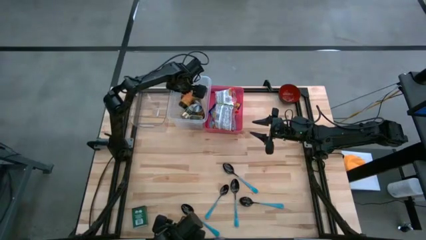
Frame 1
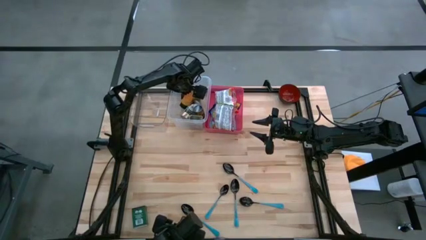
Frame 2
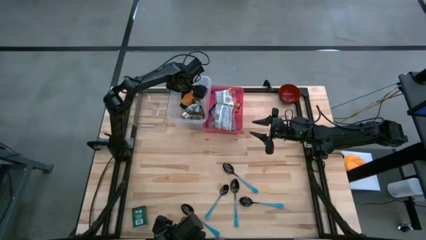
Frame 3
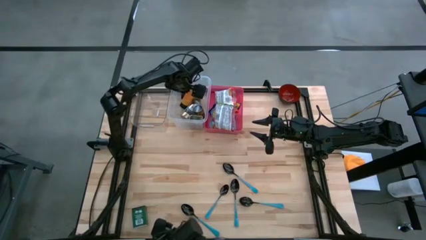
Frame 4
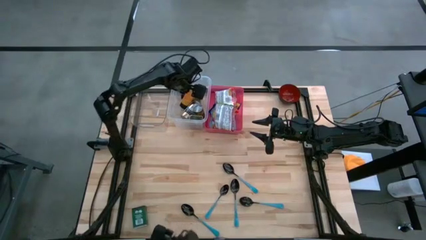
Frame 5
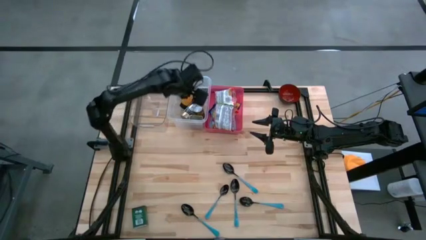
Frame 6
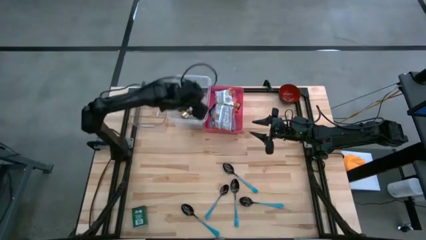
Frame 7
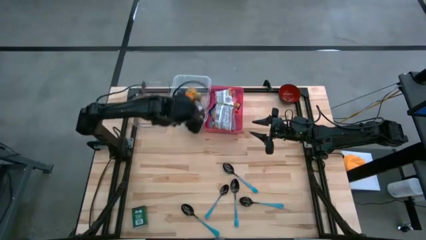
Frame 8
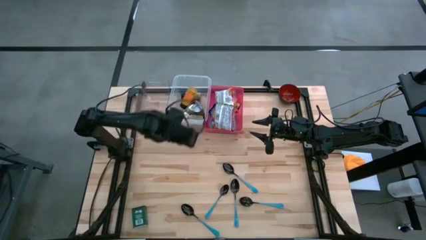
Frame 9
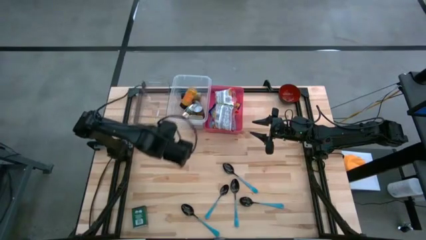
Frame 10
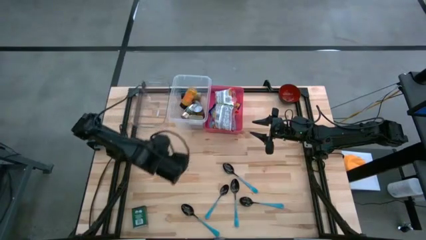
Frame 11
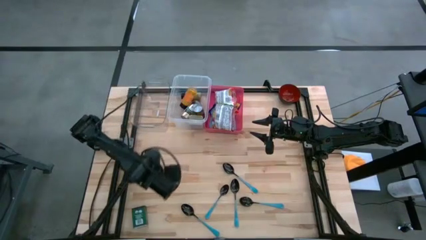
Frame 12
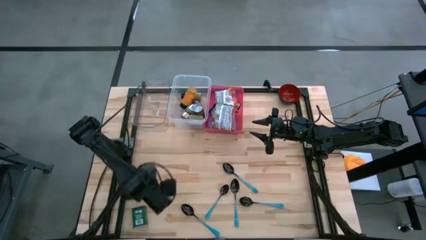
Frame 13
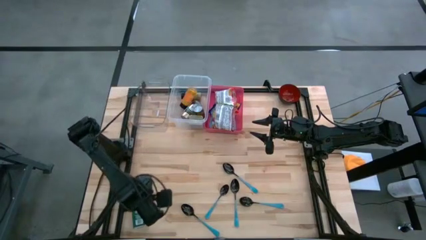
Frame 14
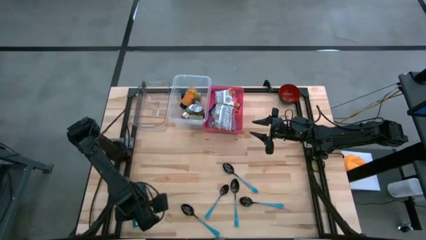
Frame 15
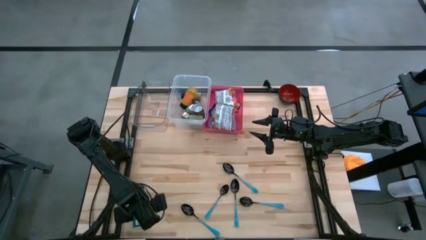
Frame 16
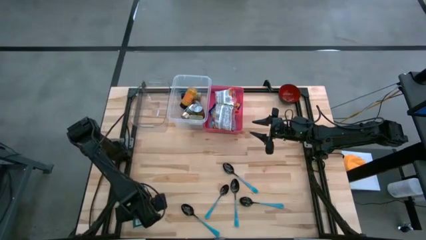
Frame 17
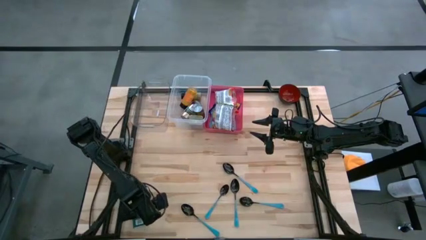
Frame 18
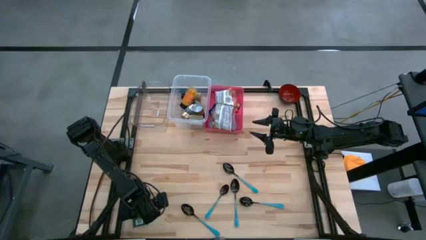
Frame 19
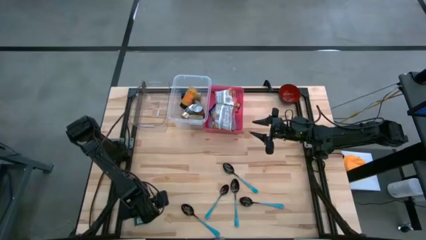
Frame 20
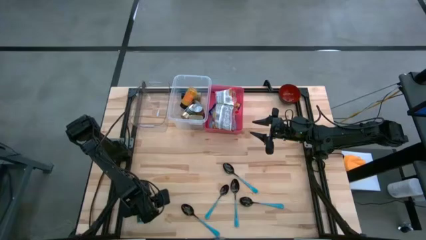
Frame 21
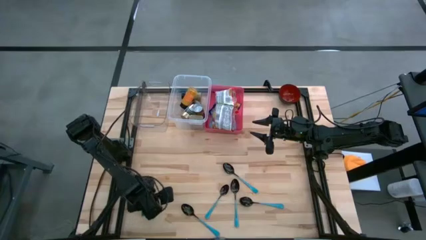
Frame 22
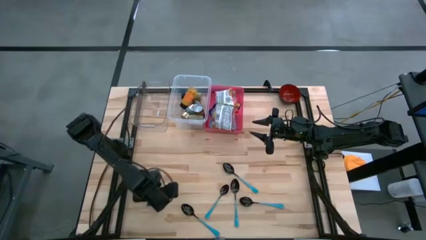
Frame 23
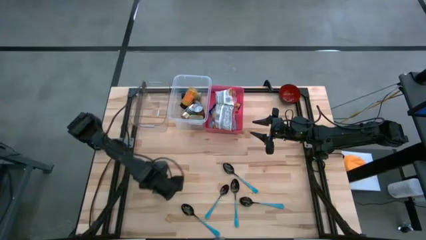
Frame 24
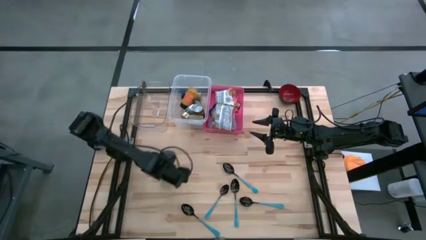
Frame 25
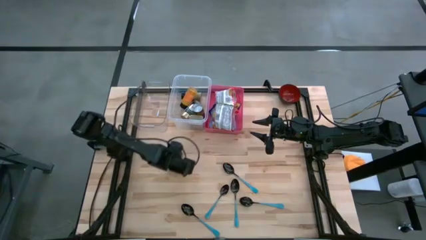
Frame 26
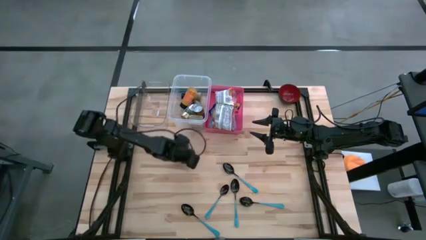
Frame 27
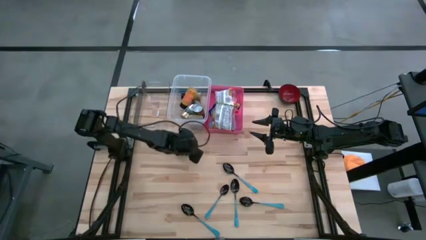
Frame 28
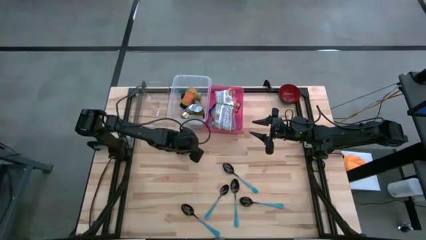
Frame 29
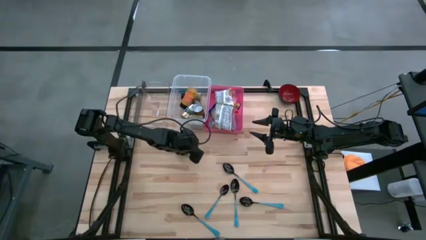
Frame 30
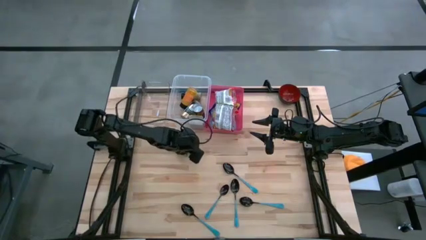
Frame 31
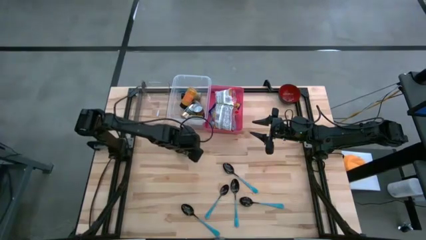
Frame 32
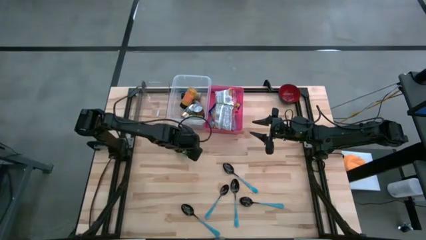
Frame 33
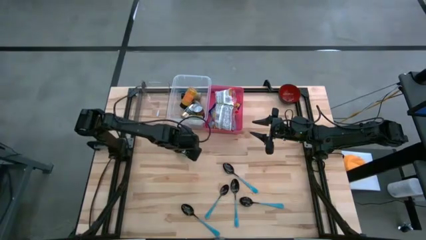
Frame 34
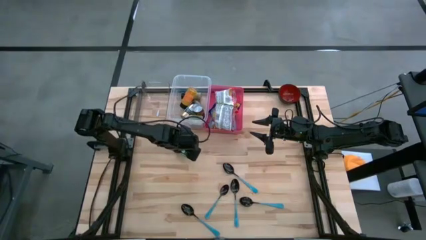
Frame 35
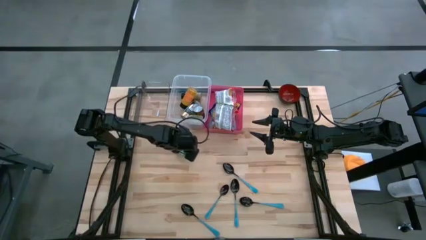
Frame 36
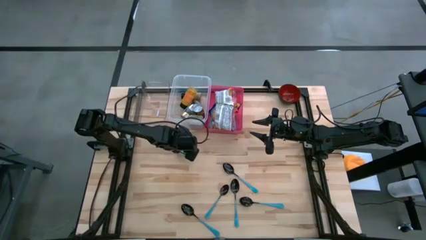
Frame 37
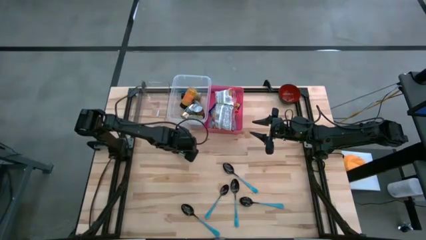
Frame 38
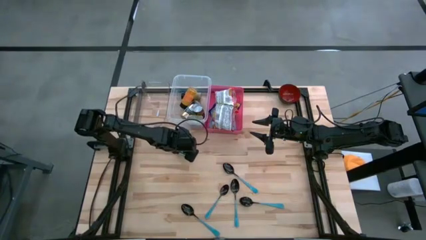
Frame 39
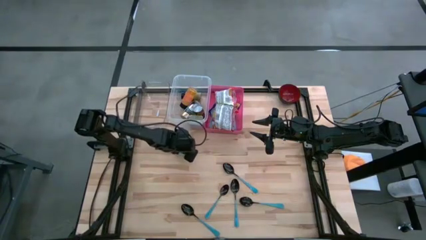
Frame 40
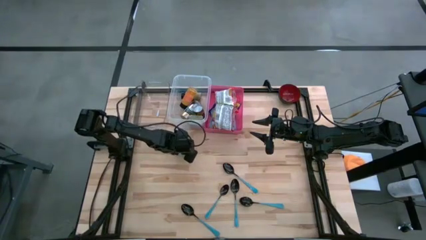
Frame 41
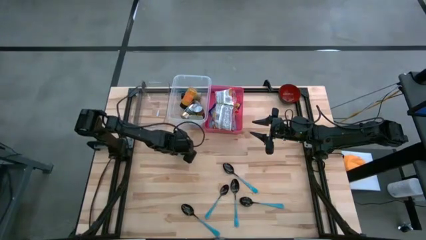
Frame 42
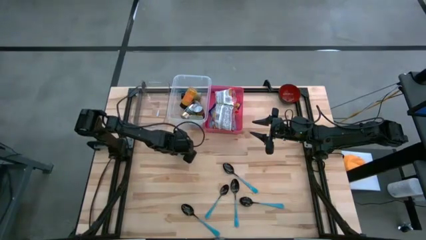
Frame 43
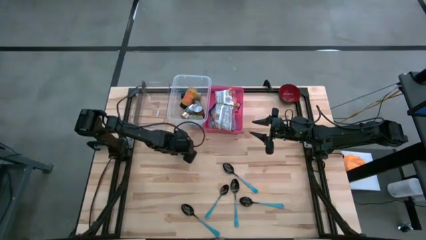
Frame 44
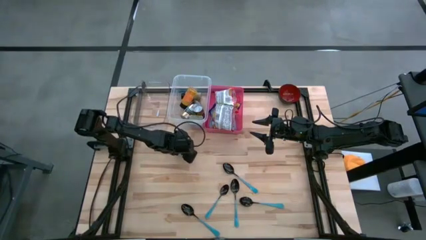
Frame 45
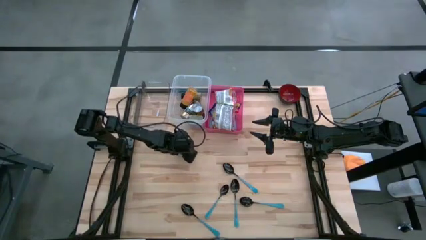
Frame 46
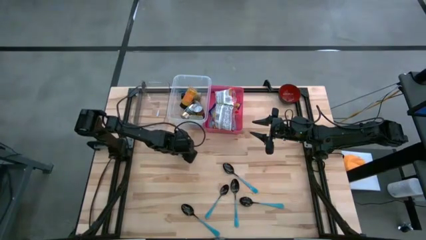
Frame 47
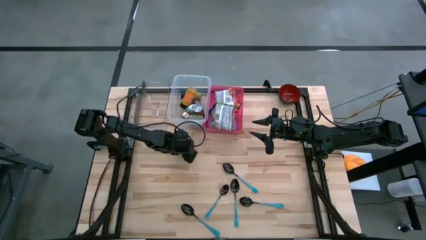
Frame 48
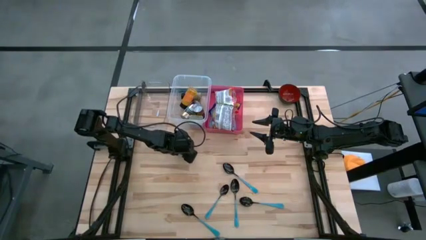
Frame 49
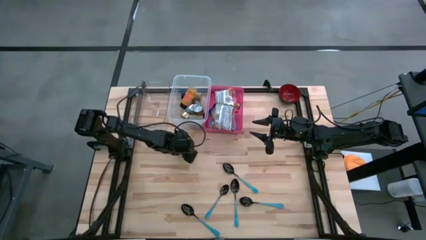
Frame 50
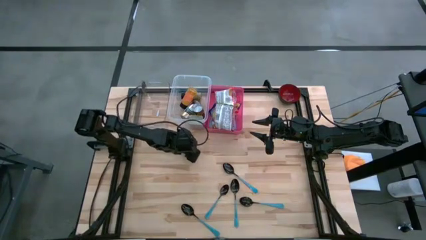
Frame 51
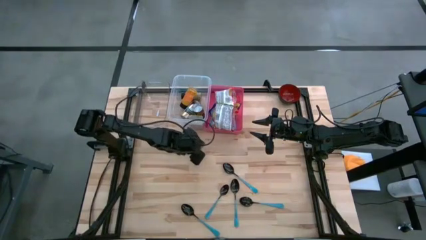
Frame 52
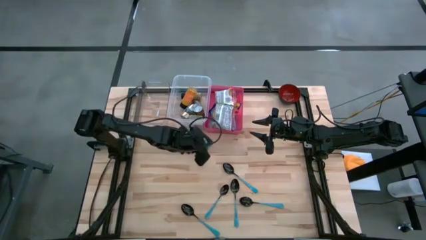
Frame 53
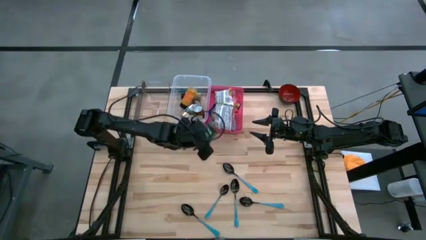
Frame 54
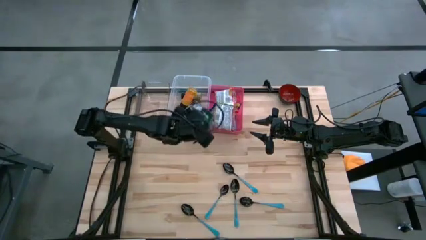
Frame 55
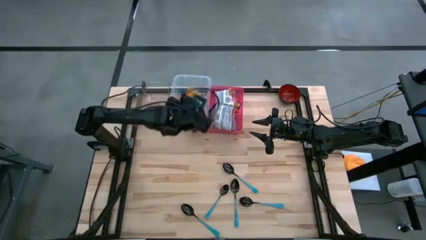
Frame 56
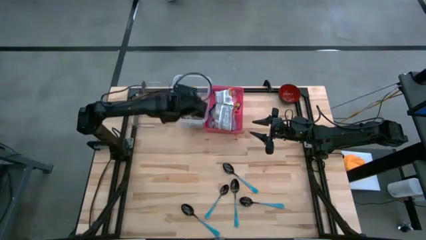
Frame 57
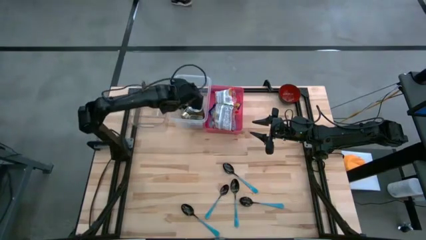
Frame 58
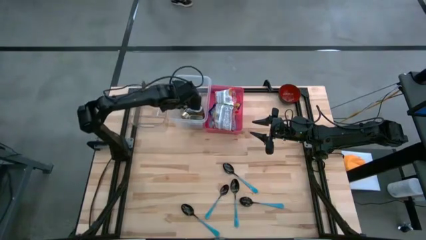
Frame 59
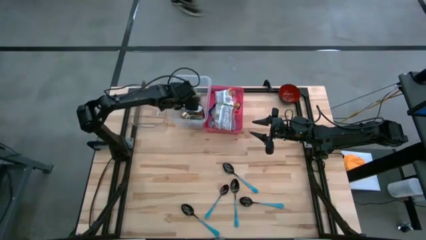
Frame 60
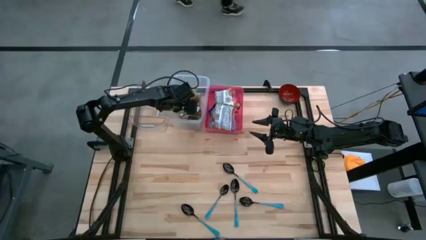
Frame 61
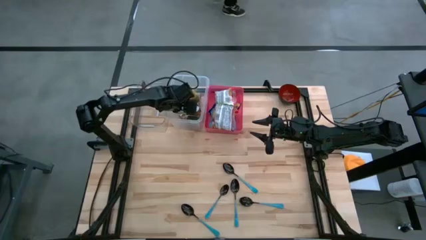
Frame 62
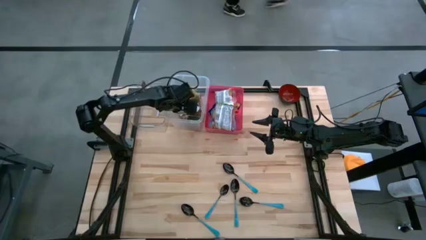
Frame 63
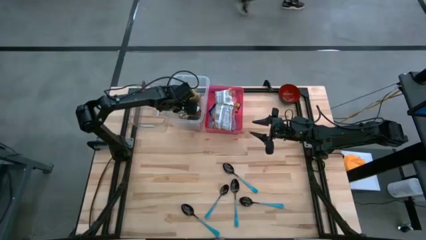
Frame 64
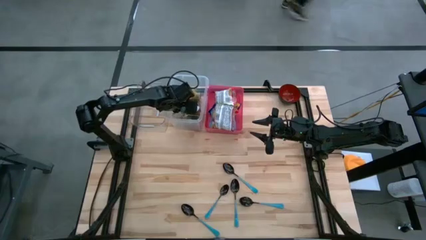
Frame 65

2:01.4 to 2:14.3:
Put the black seasoning can into the right transparent bin

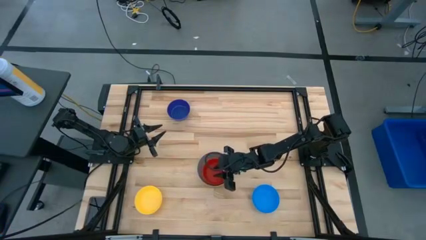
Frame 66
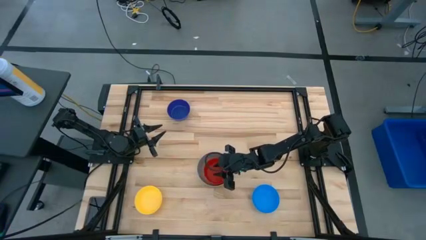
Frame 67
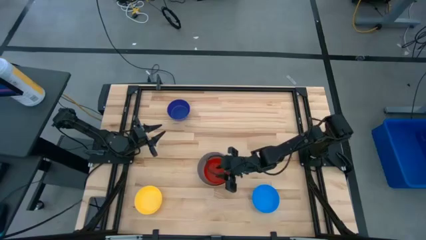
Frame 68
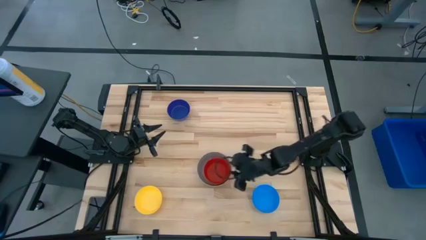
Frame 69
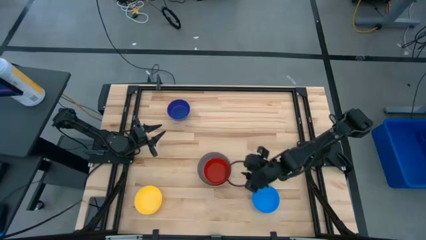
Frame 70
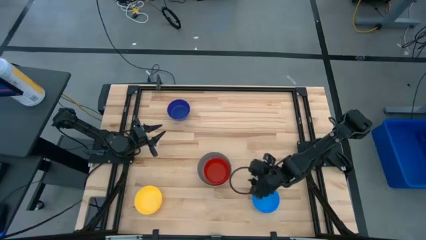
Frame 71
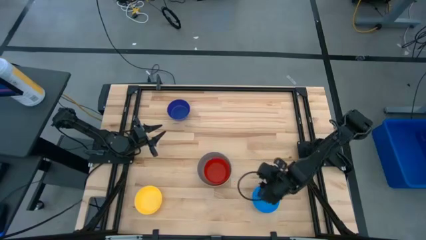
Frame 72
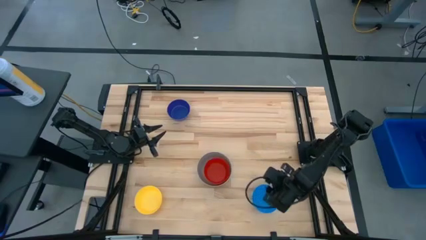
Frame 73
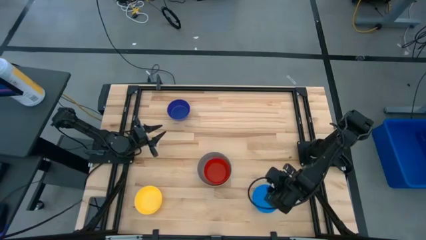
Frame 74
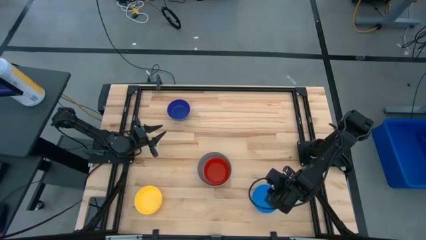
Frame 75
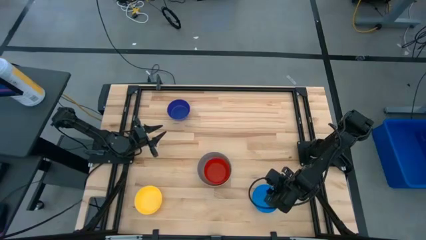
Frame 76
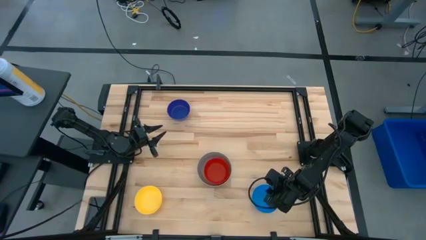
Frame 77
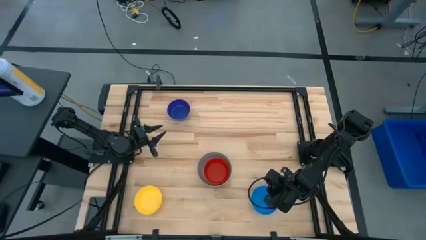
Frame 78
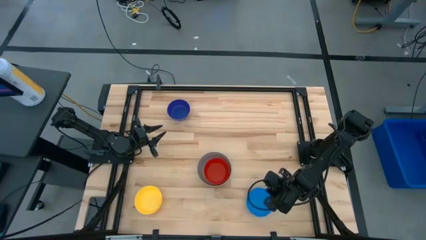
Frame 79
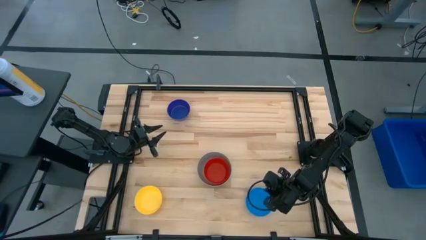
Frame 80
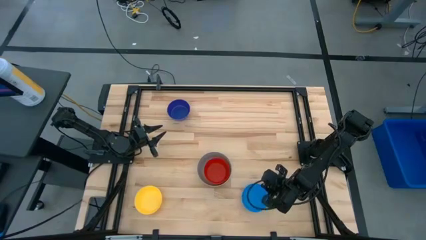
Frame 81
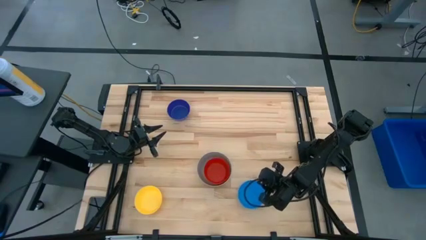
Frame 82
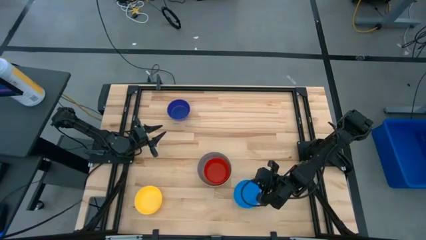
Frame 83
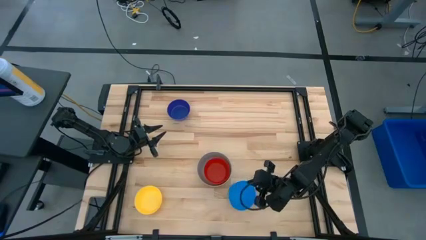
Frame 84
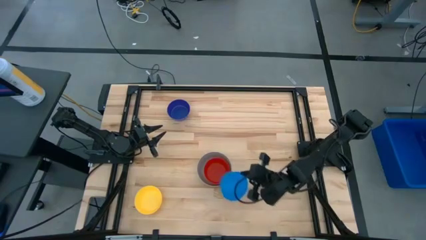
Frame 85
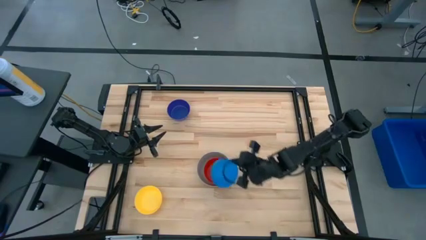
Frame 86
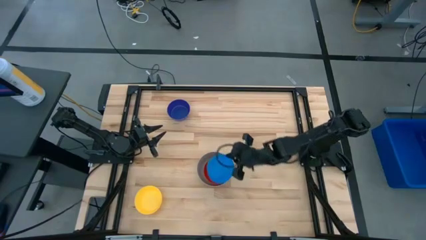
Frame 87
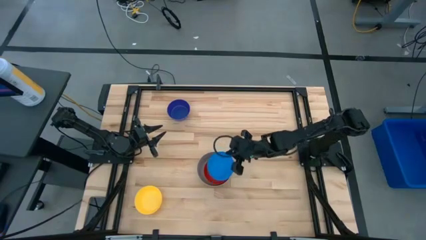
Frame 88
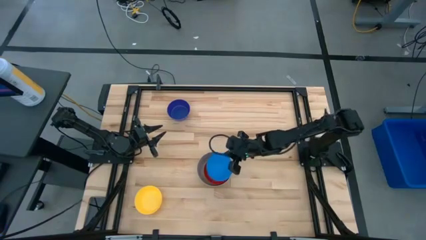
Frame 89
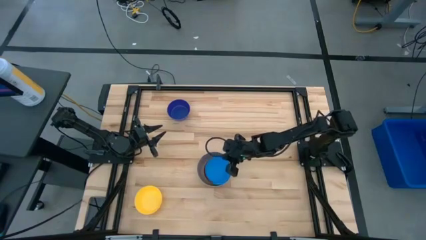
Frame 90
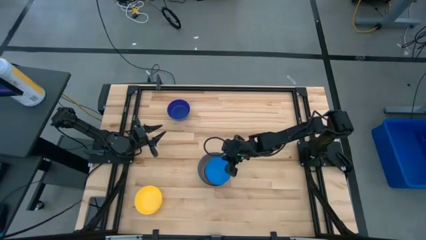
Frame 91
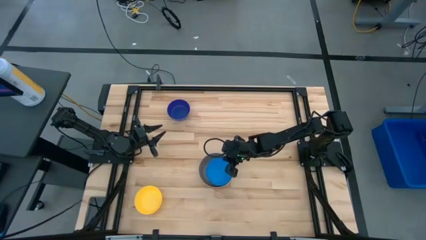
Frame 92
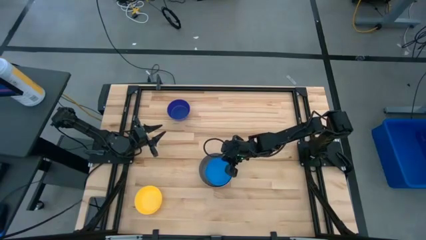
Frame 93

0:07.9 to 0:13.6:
Stack the light blue bowl on the red bowl
